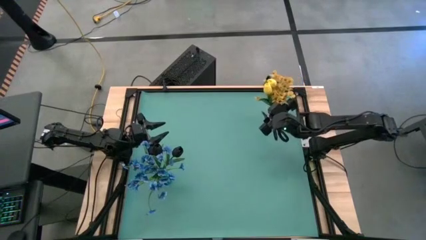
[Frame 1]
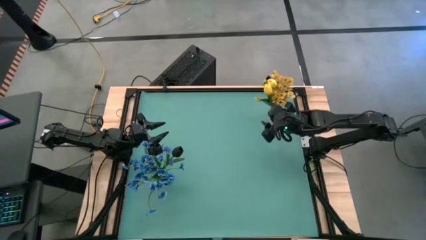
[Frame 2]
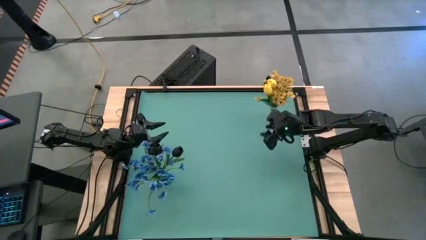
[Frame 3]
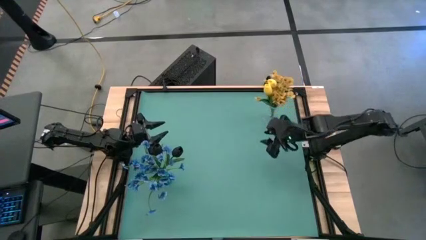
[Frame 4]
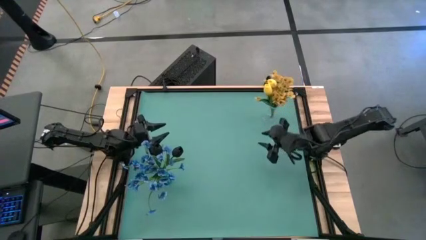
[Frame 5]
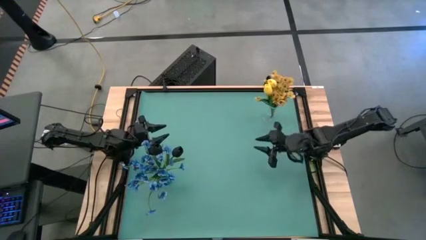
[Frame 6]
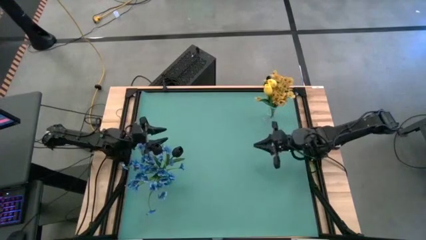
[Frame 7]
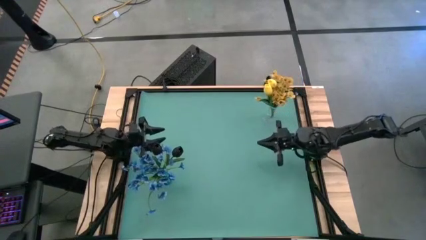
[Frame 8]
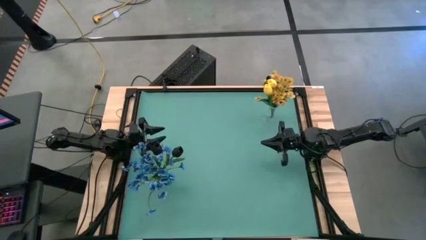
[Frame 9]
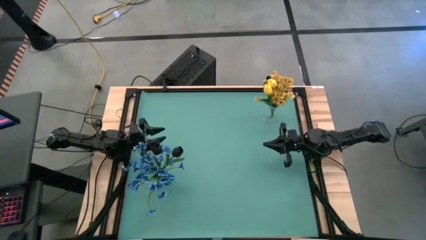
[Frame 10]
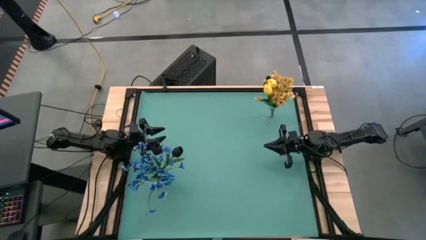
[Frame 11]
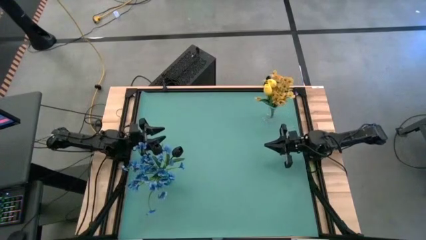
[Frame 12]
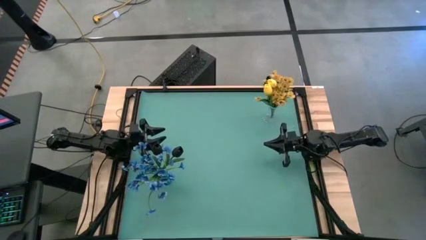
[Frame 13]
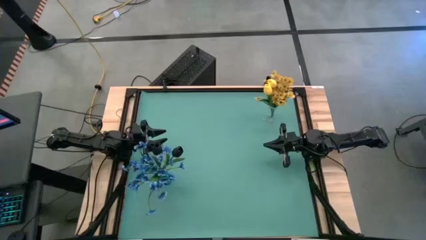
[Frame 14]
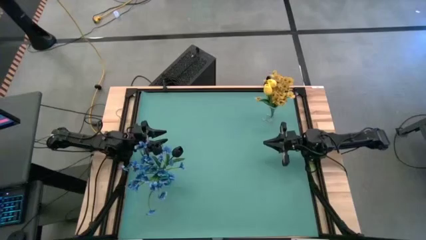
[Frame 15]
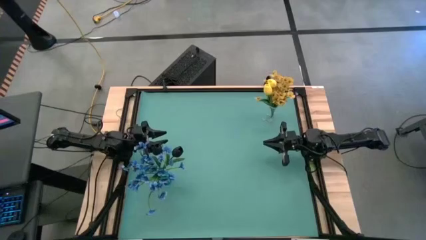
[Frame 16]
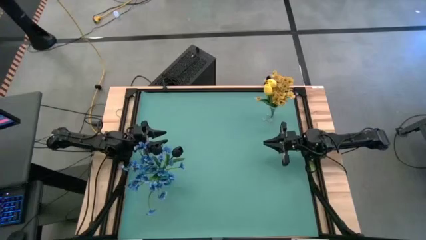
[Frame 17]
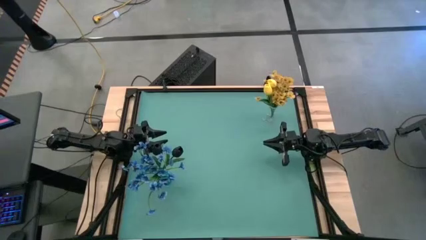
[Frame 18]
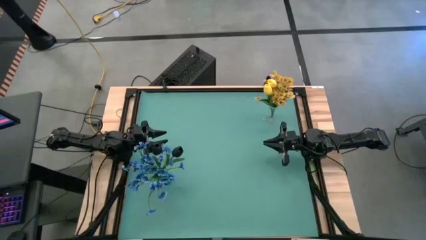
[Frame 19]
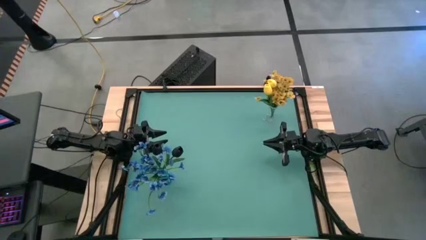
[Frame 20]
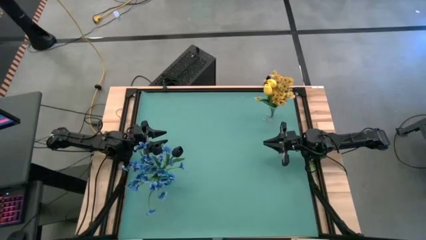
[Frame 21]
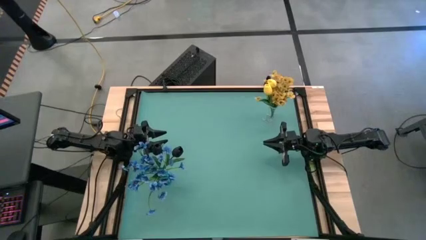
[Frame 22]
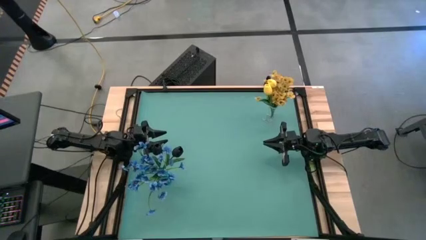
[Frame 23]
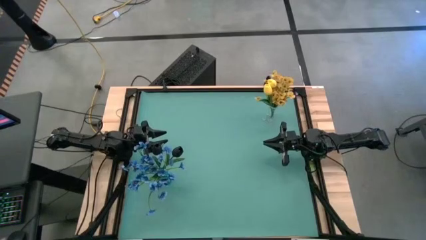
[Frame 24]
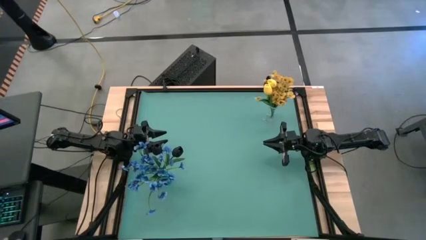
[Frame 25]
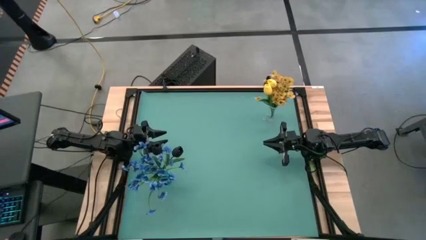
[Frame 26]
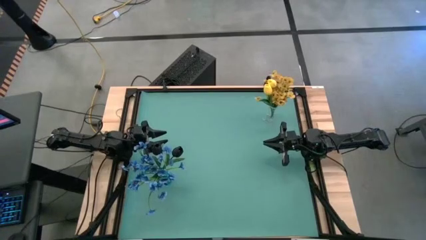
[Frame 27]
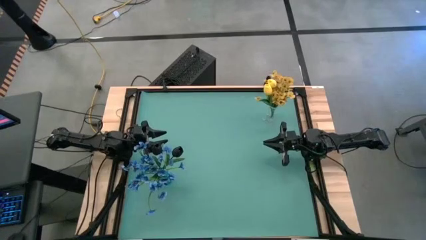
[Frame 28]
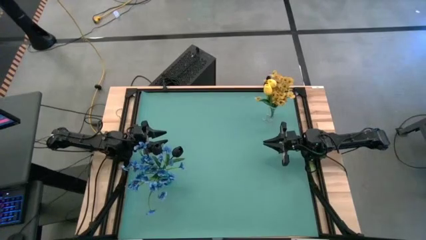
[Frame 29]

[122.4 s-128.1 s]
Task: Sort flowers into vase by color
Return to Home Position

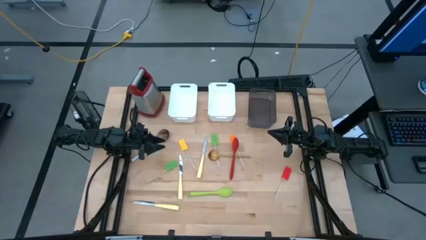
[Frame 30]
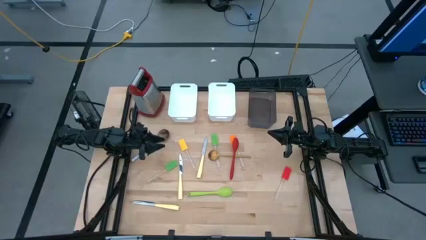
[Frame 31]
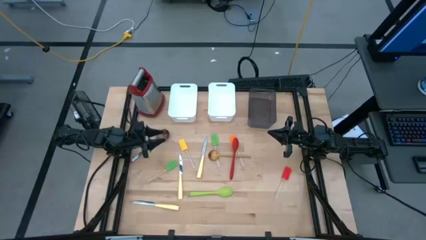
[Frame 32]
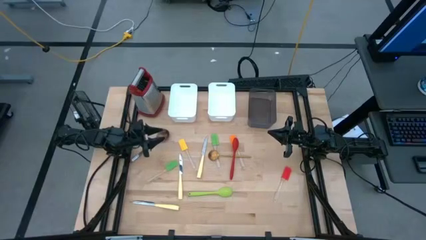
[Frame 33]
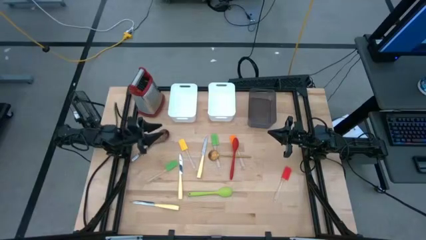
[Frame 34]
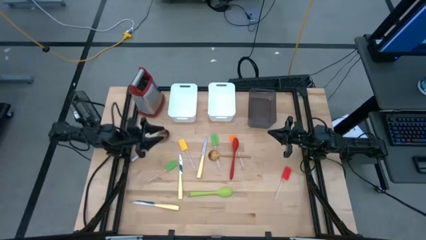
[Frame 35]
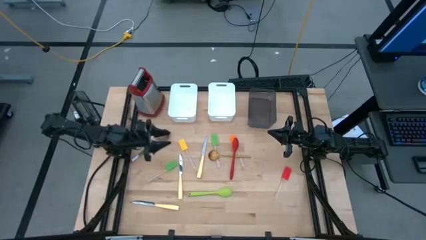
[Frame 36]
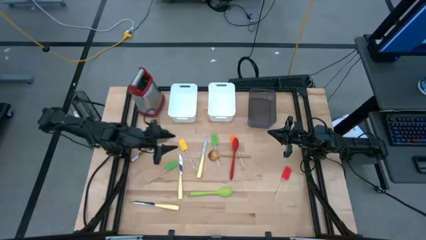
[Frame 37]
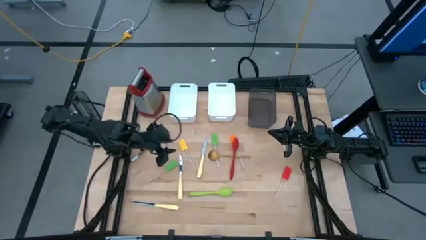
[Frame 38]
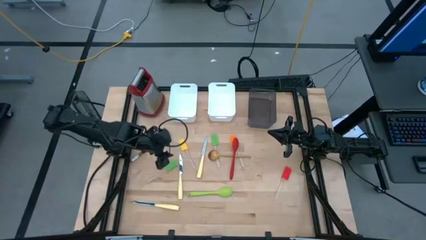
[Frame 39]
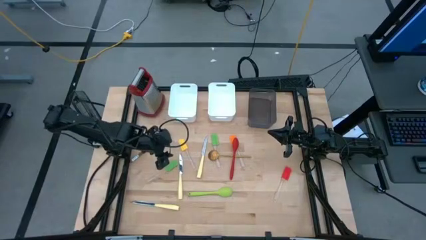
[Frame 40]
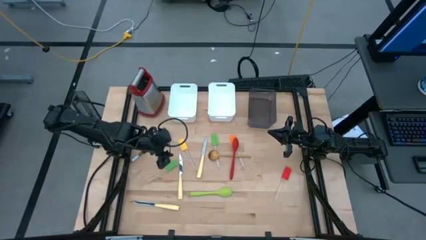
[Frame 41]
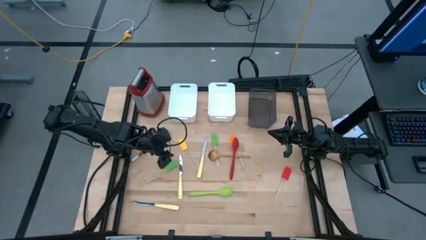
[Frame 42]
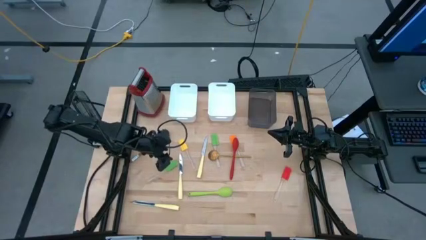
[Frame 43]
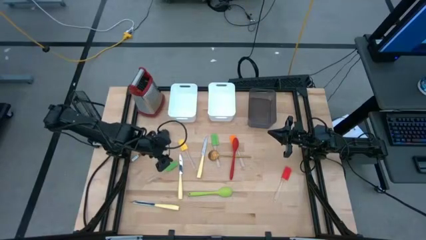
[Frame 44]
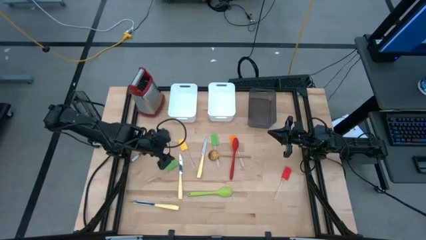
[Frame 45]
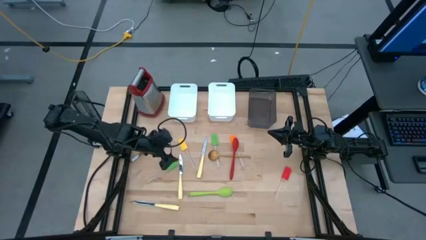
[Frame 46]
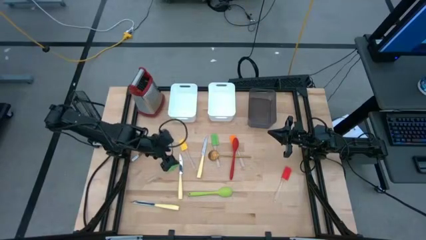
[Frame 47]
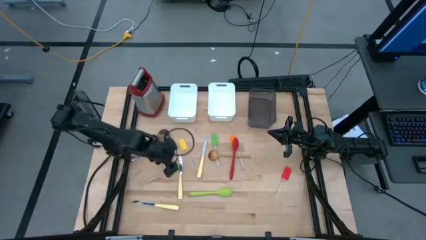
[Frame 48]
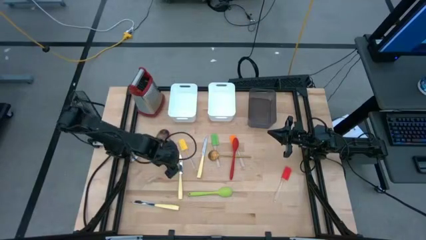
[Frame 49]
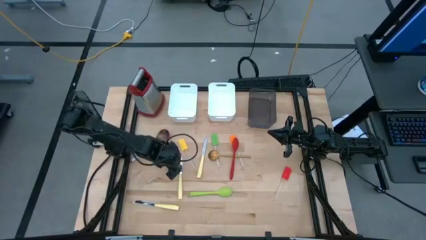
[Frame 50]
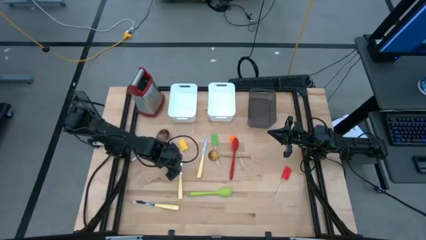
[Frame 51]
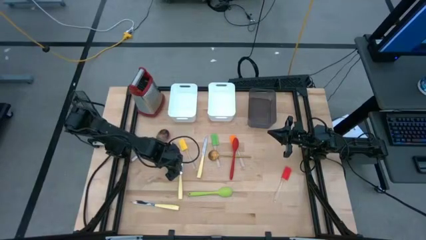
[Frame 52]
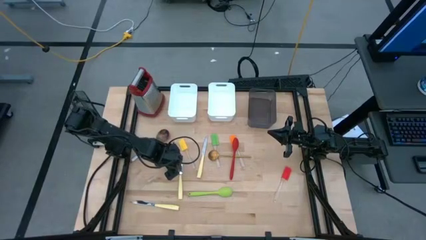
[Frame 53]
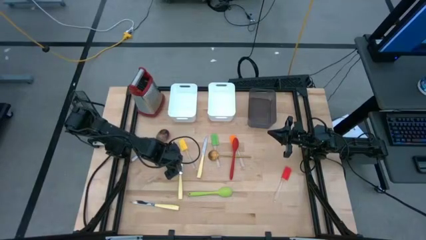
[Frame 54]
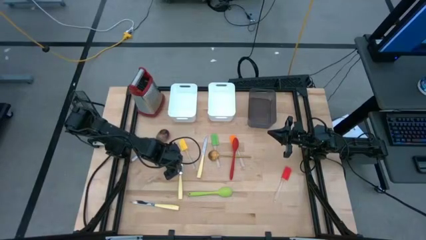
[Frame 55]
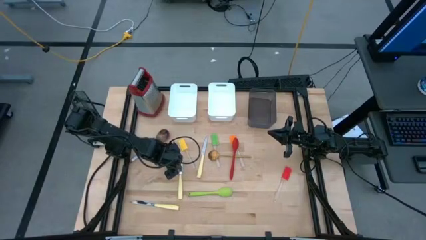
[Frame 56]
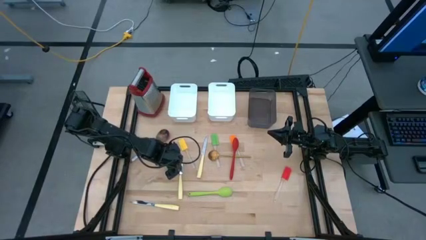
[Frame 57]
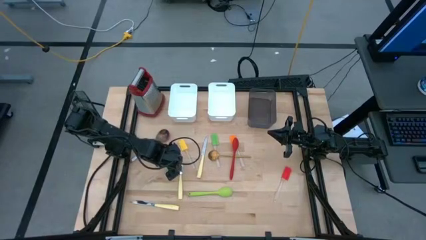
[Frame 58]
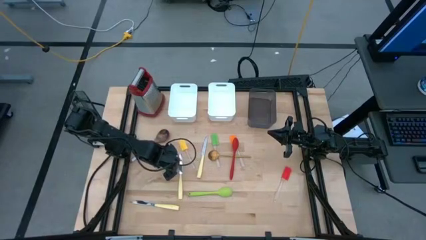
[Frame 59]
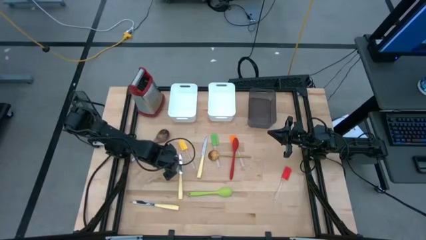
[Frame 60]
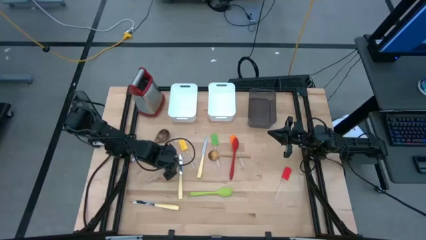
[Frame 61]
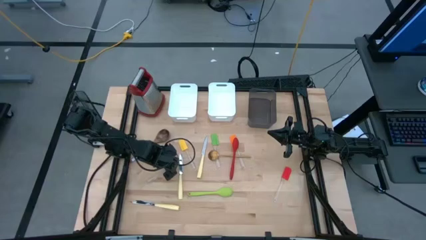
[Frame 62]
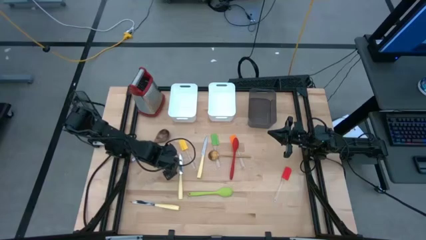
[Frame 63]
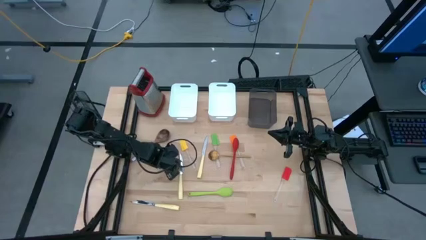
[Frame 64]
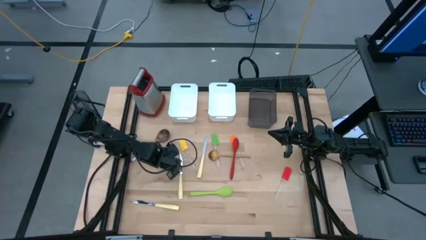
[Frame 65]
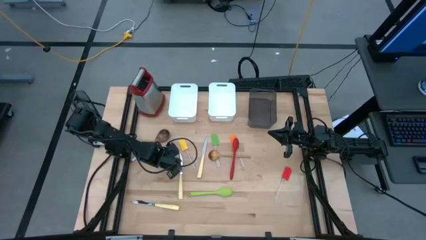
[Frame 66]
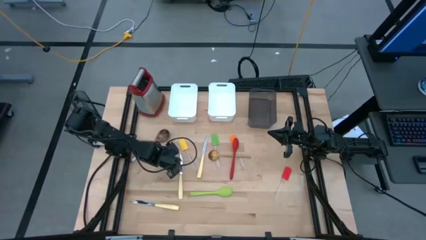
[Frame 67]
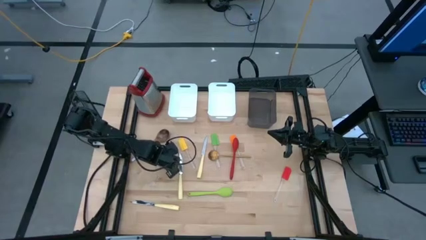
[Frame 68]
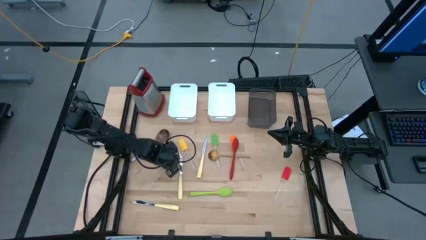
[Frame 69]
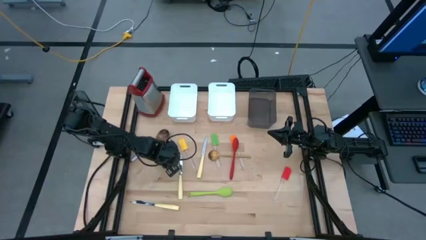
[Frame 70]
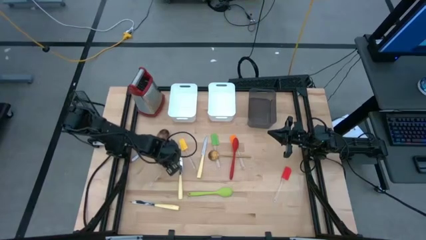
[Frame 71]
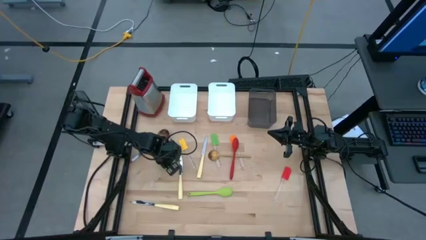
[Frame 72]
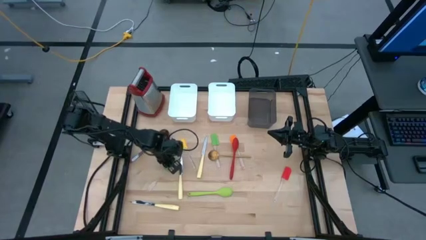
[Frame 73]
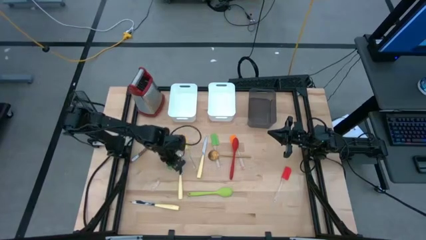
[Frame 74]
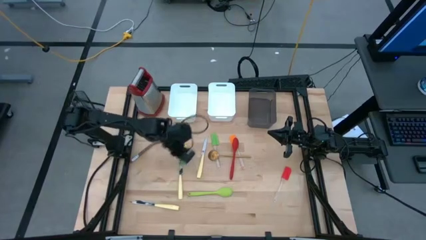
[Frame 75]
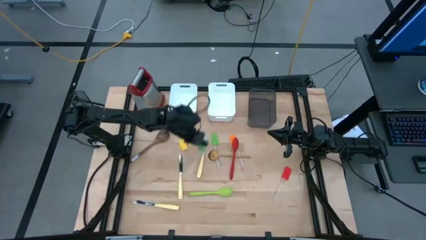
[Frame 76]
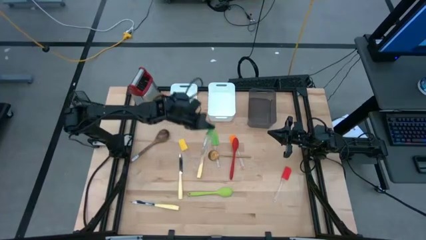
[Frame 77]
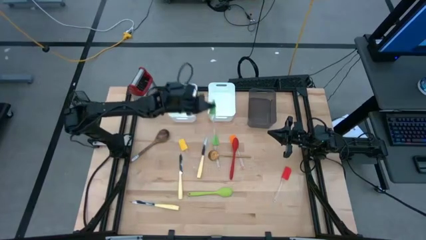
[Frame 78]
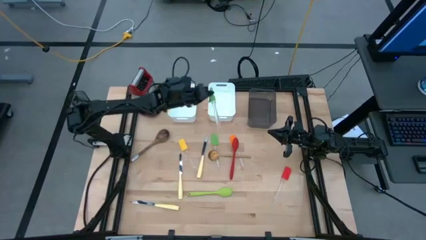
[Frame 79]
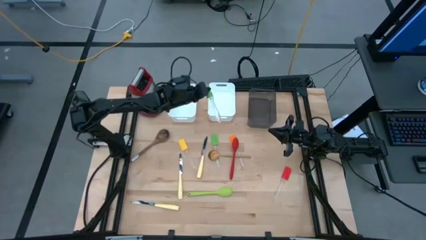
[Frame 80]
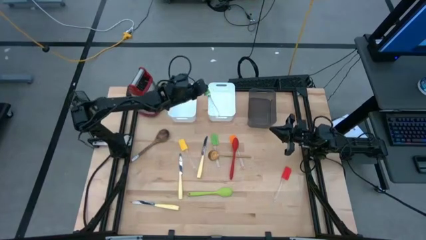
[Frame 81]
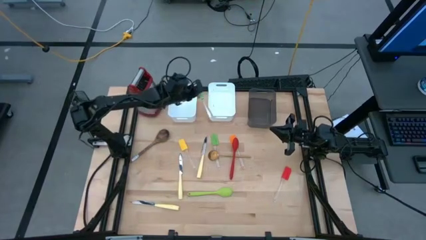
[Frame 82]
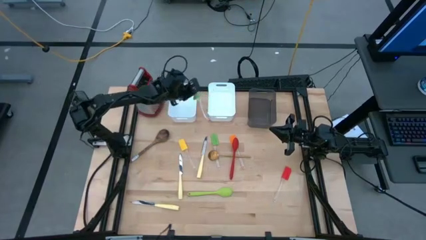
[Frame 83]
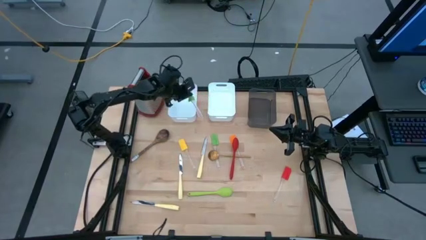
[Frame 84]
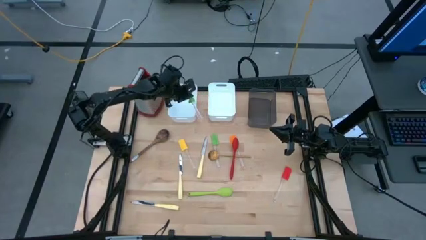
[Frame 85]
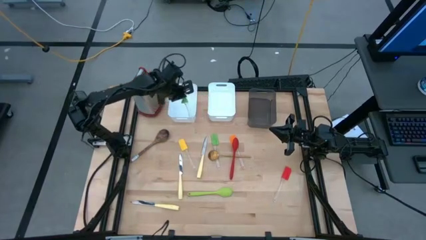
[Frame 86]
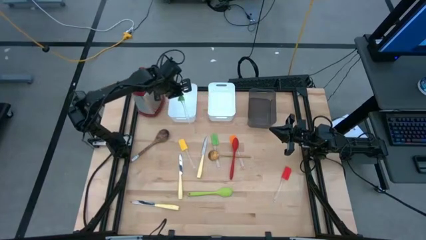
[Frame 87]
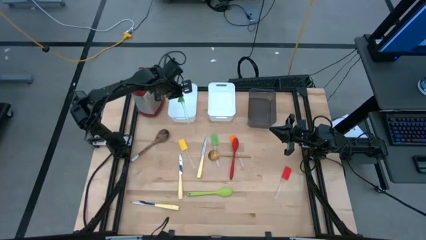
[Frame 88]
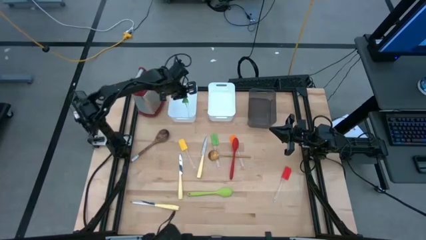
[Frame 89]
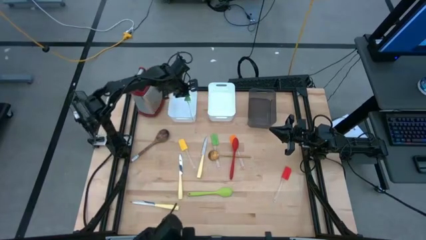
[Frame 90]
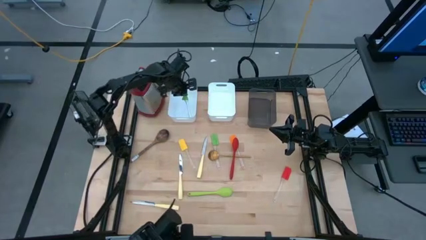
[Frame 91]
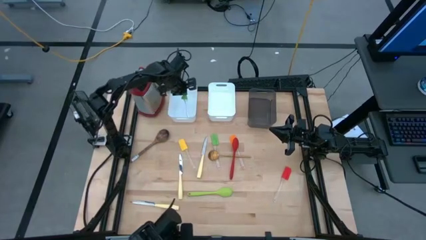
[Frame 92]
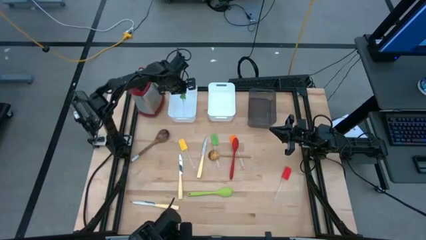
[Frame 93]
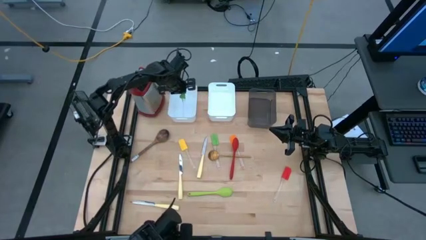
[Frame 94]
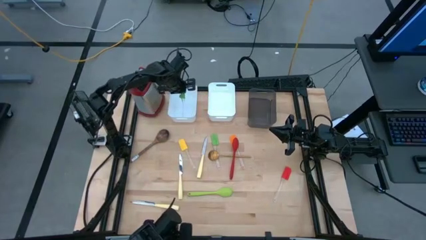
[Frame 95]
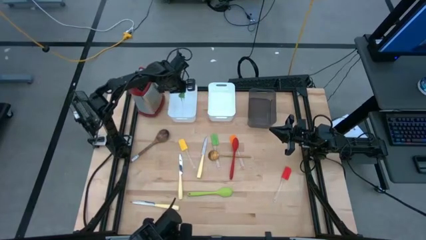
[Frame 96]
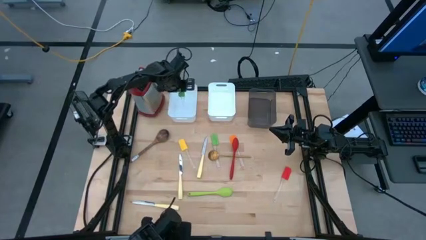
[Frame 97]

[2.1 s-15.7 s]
Task: Pick & Place Kitchen Items
Put the left green spatula into the left white bin
